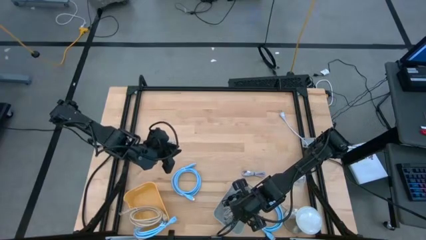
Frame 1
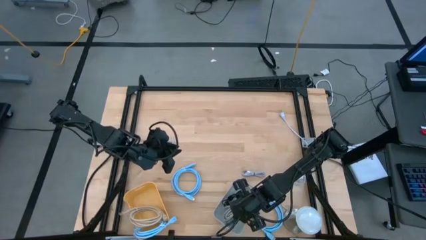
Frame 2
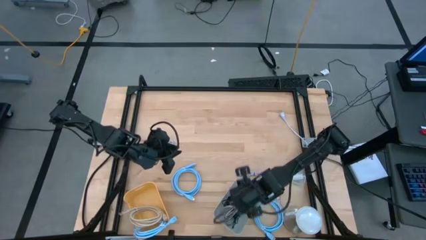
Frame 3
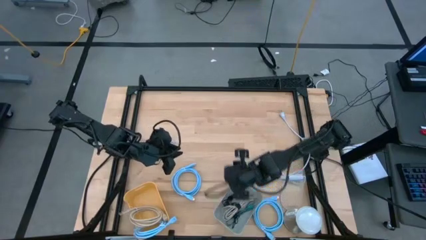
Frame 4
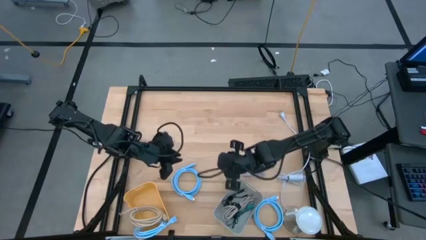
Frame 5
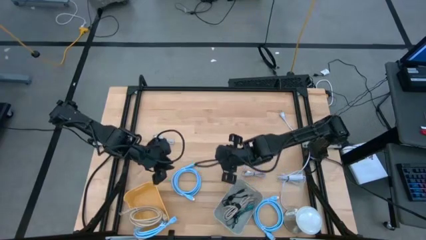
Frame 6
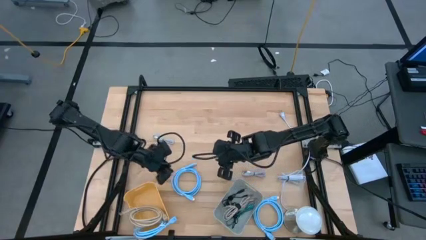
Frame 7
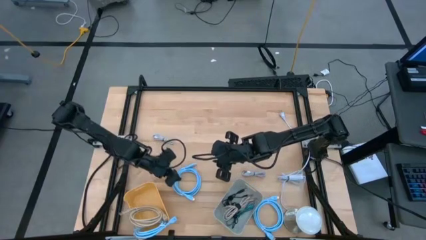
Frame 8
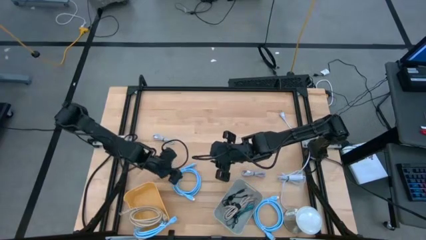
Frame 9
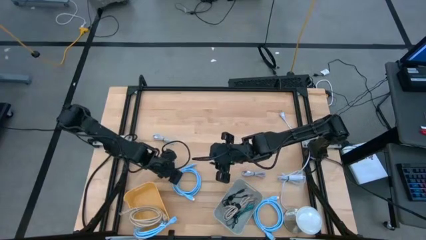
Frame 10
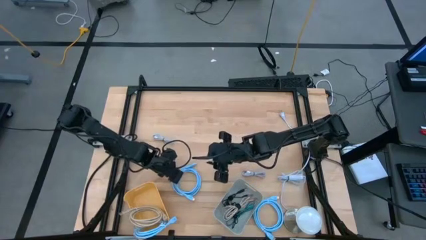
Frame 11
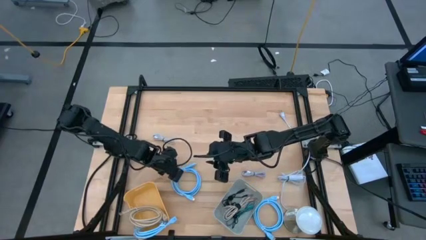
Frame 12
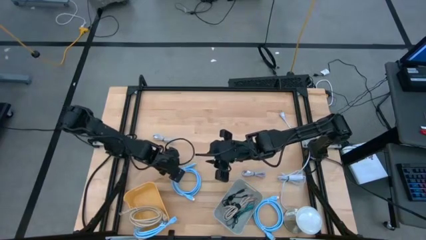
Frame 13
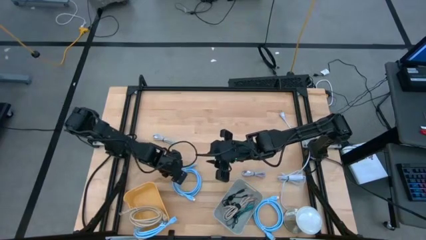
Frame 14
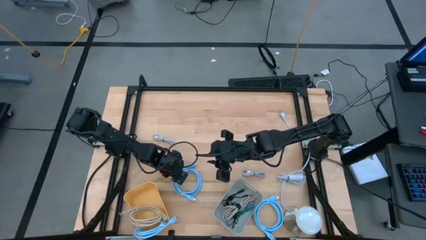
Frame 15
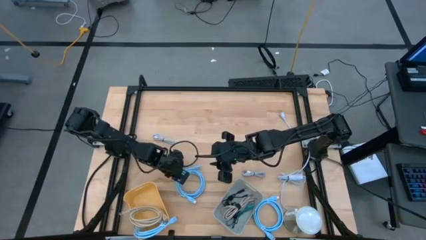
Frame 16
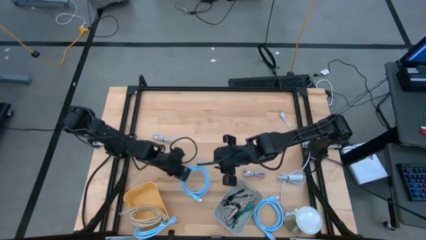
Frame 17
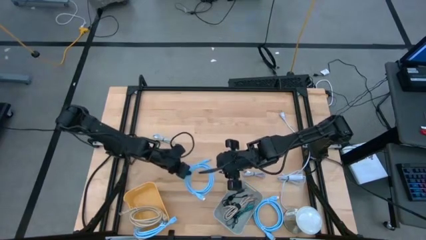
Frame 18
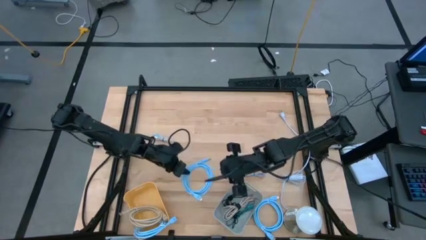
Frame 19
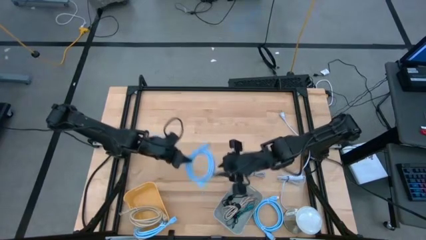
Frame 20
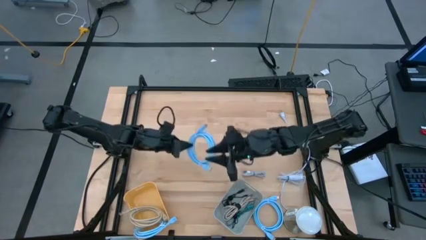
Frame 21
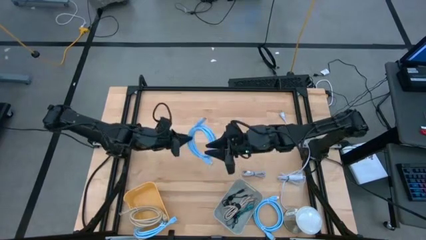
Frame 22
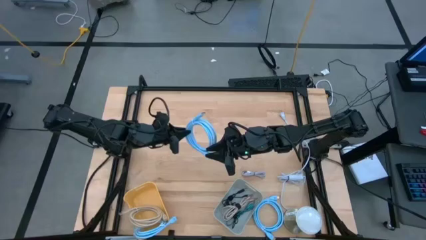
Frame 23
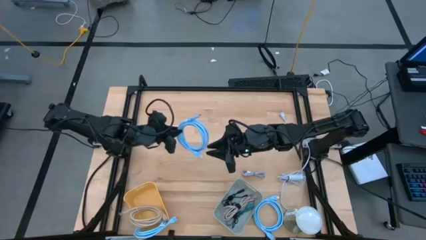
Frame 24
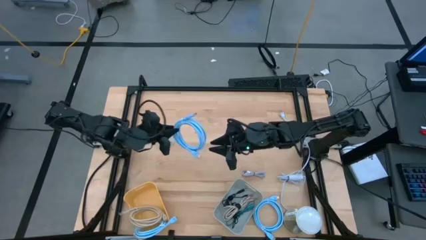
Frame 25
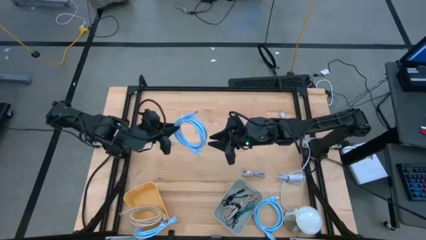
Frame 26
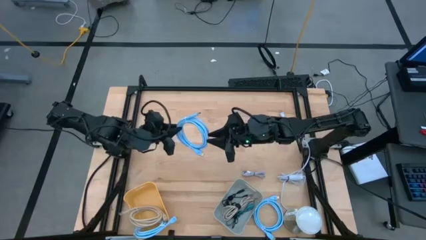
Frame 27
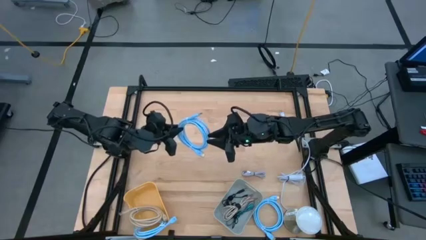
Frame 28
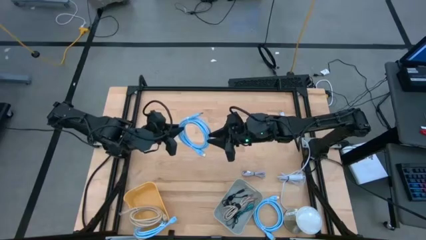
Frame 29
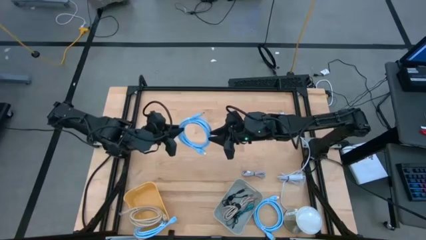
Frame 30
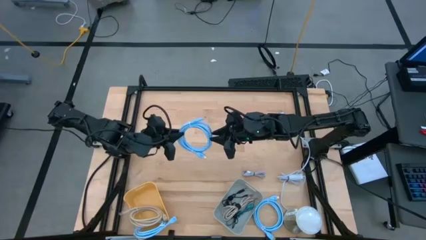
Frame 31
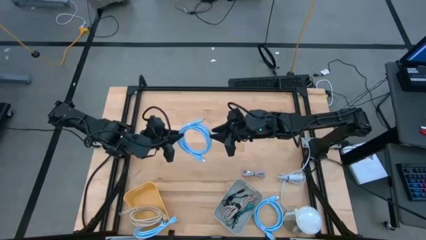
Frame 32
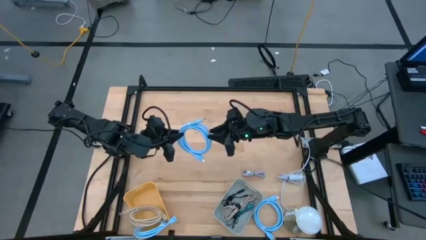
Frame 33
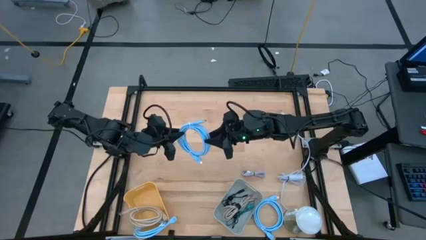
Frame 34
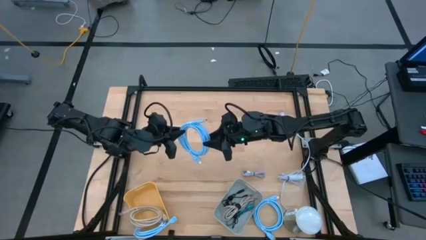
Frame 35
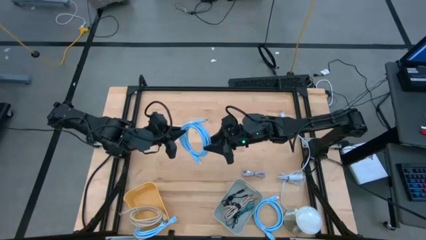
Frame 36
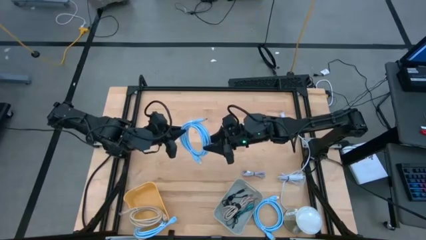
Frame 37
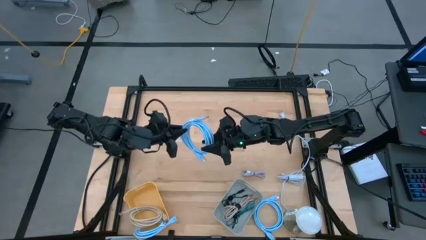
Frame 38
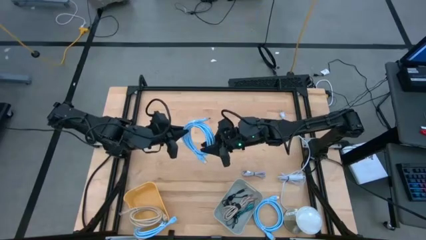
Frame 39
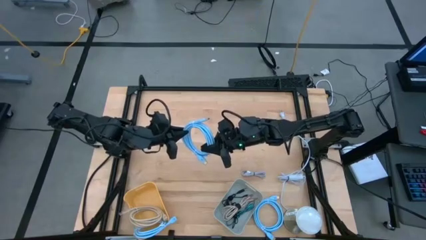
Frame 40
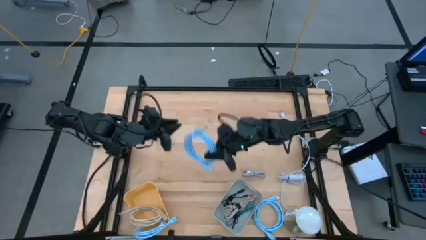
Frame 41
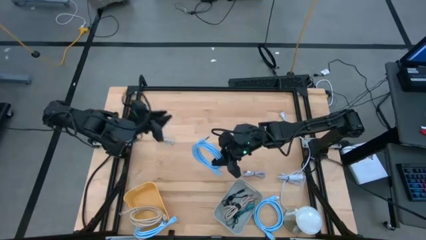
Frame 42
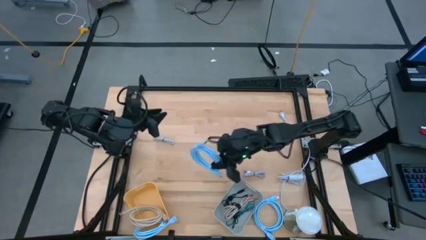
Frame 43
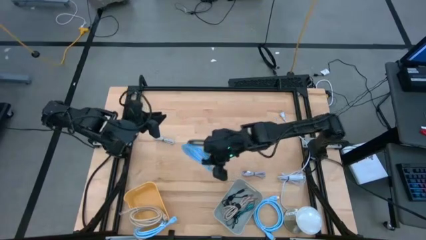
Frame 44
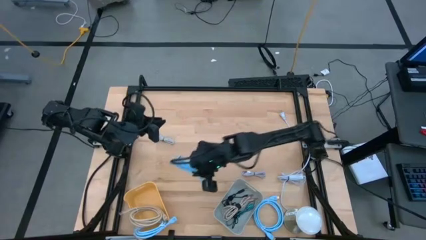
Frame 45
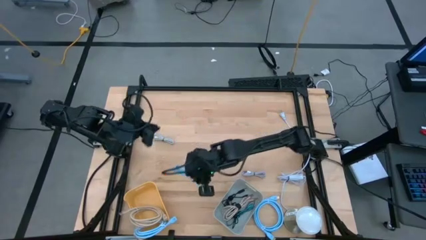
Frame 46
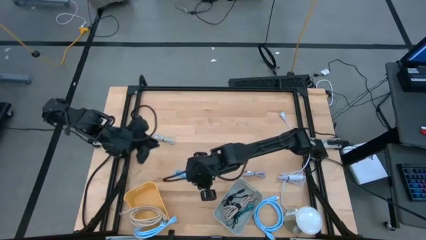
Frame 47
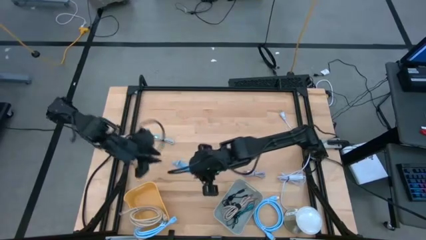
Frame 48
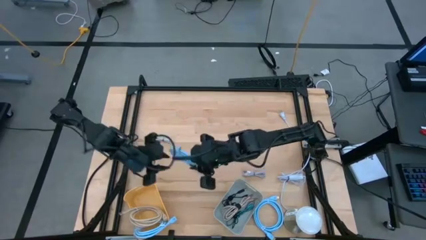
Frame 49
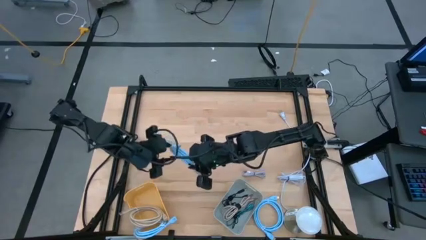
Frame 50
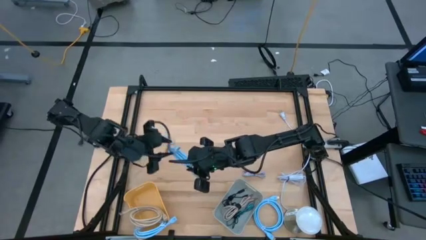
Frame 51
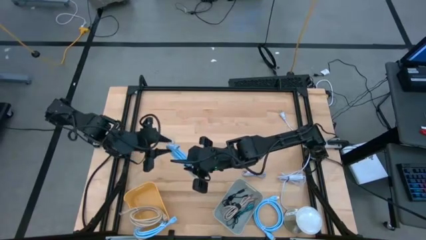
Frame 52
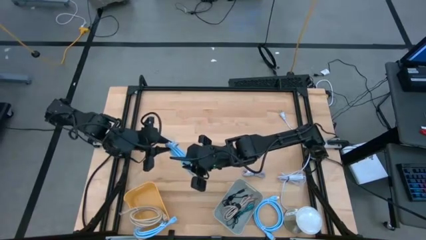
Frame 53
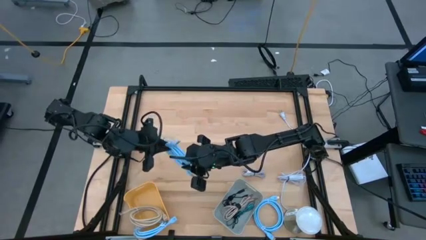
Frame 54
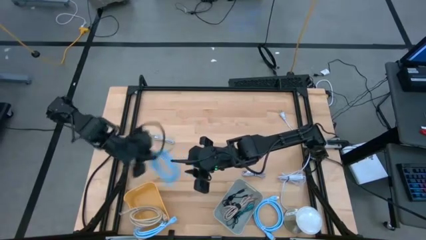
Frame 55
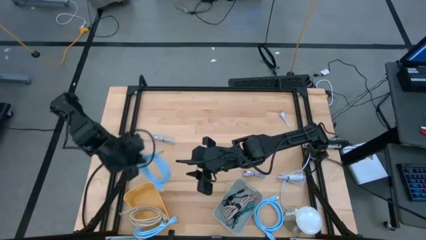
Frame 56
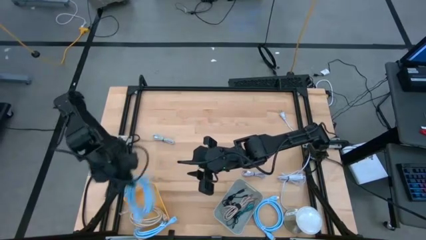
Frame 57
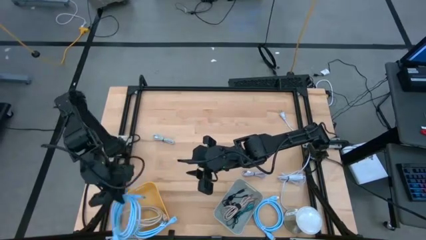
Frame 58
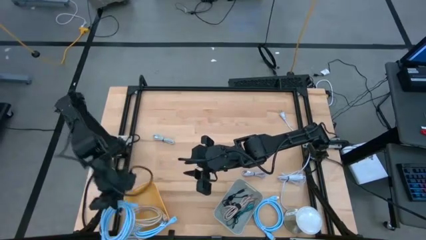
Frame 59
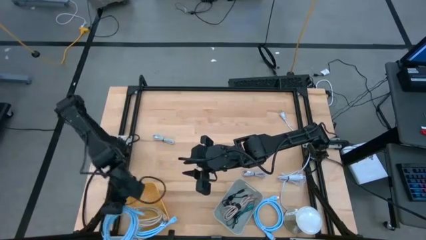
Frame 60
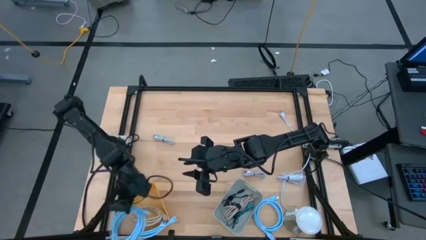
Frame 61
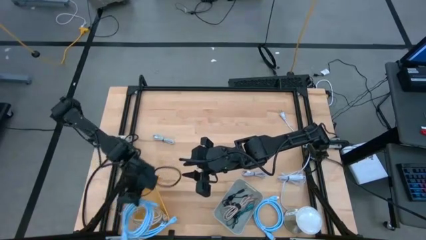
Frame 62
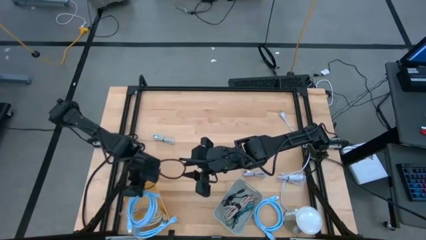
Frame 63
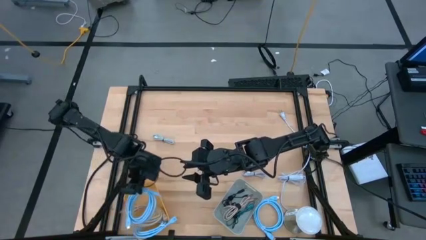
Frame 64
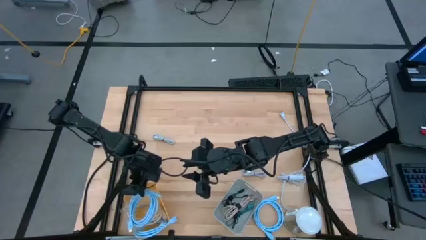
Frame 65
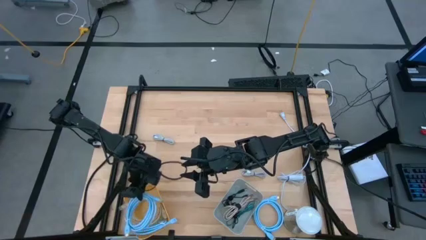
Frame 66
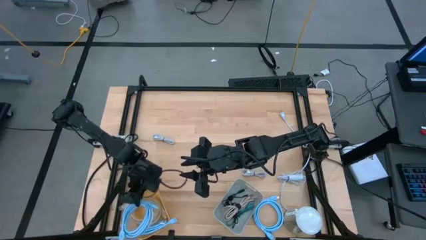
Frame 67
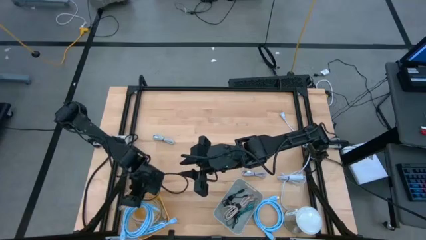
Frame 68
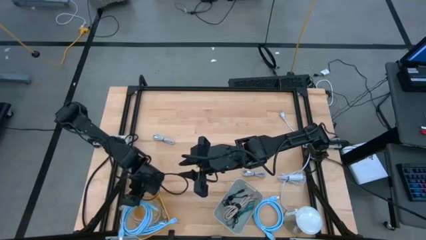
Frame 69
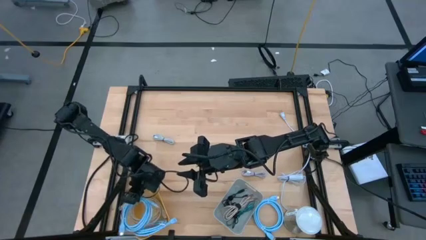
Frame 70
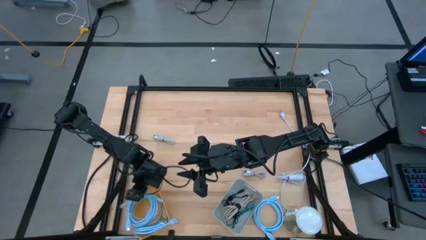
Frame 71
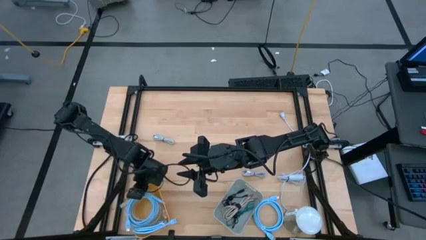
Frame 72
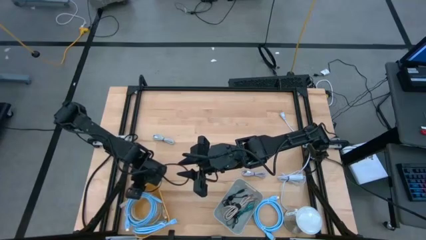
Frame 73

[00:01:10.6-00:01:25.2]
Task: Sort cables
Put the left blue HDMI cable into the yellow bin

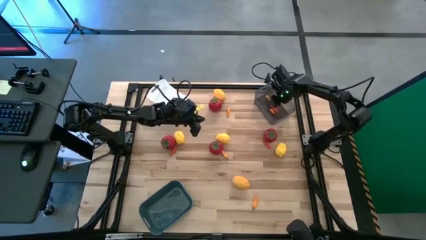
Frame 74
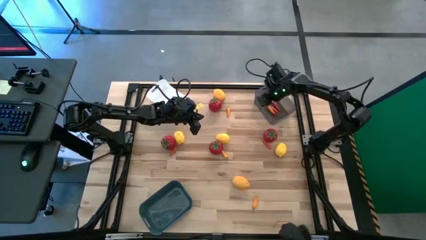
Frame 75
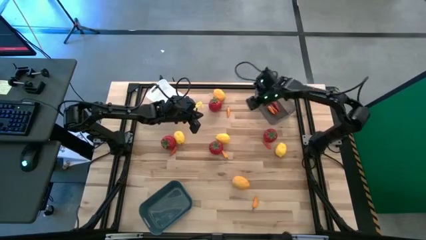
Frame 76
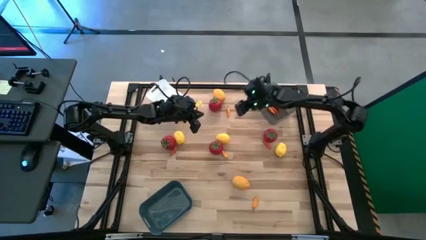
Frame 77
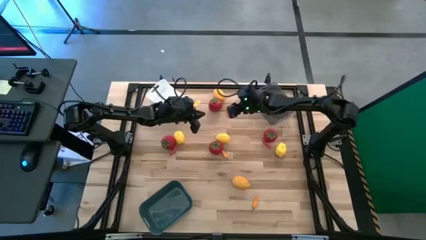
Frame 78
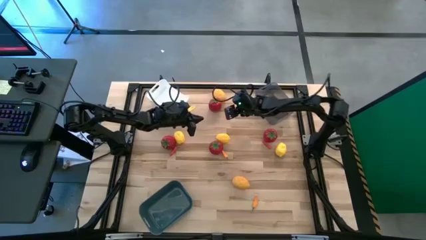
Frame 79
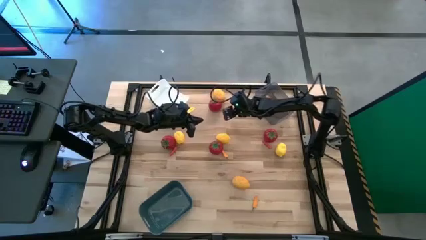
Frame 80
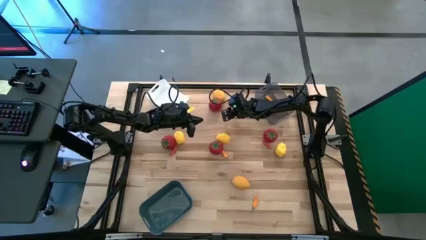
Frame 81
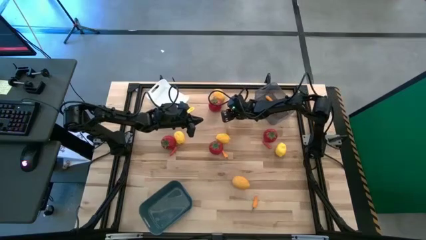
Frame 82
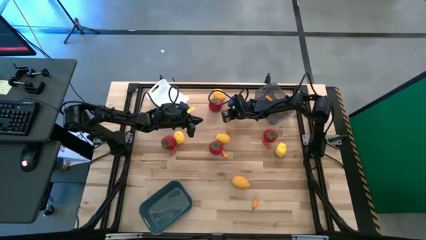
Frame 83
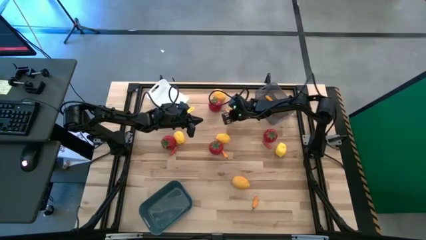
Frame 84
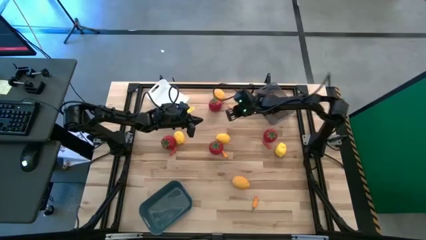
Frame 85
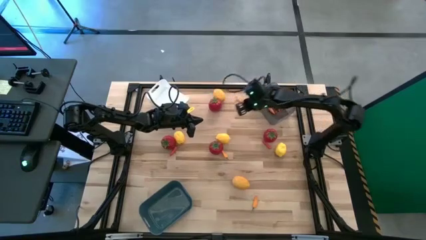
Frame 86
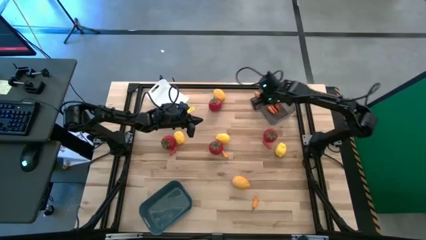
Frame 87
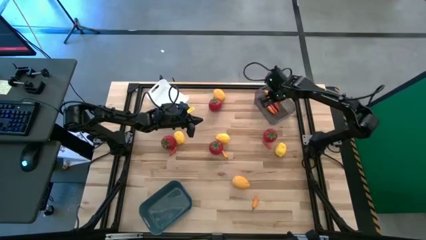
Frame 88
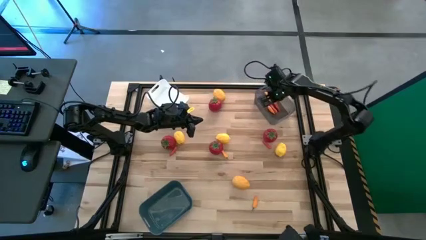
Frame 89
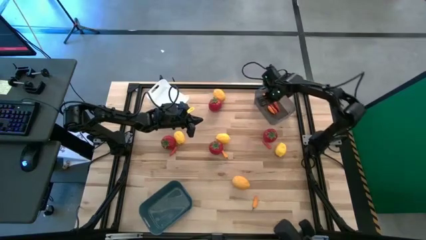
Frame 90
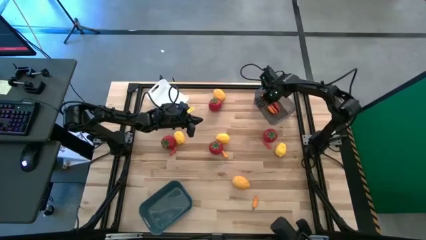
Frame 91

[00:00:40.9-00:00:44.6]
Task: Sort produce into baskets
Put the orange chili pepper into the black transparent bin
